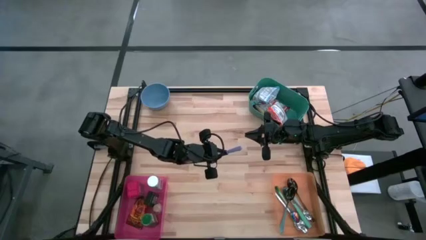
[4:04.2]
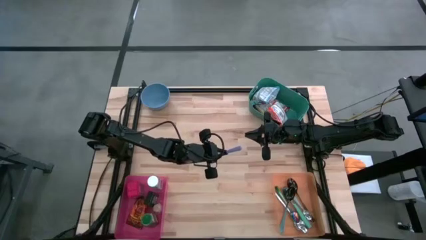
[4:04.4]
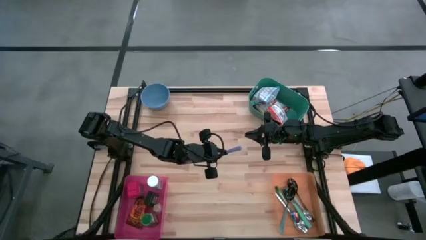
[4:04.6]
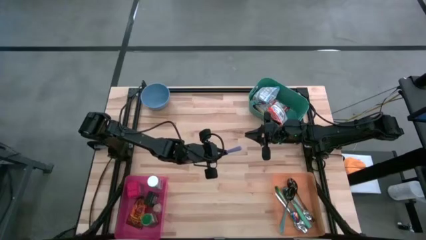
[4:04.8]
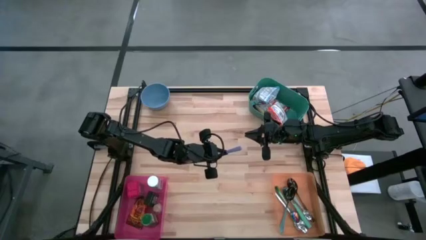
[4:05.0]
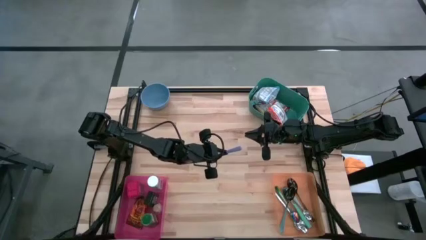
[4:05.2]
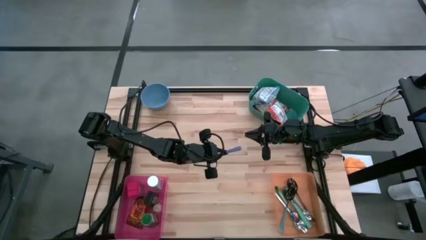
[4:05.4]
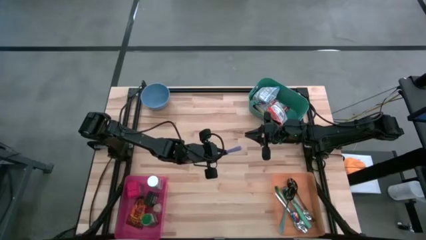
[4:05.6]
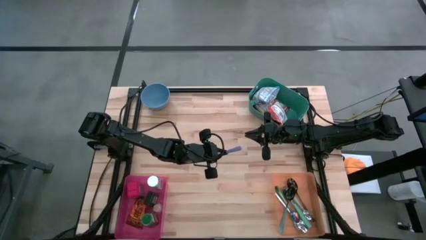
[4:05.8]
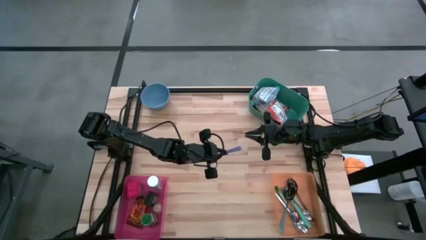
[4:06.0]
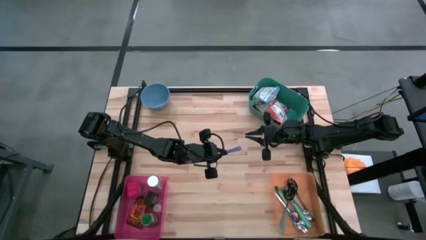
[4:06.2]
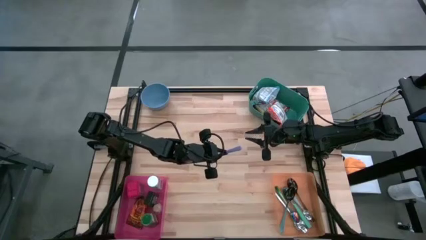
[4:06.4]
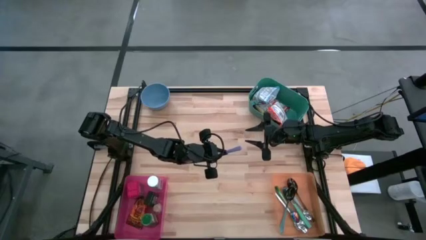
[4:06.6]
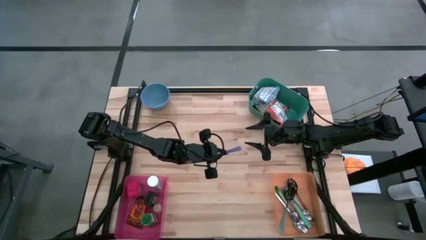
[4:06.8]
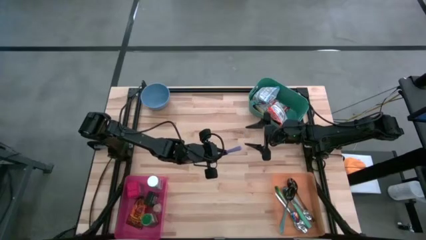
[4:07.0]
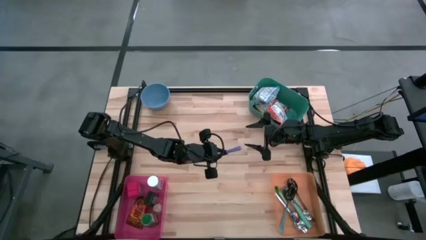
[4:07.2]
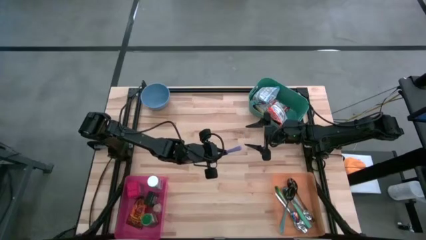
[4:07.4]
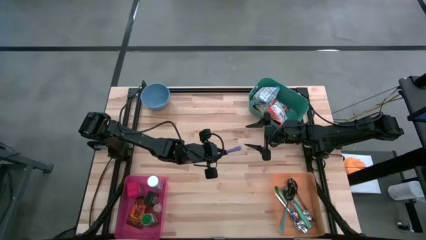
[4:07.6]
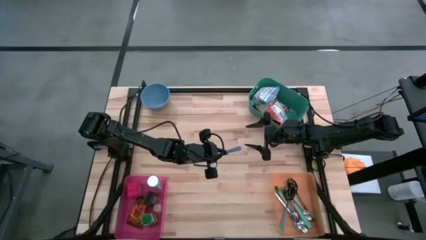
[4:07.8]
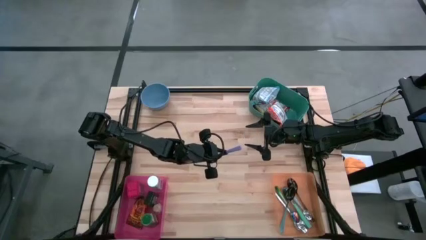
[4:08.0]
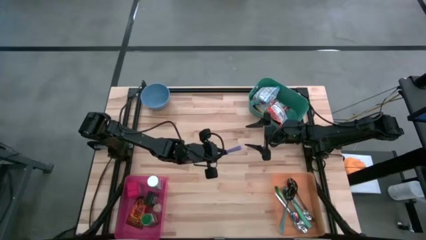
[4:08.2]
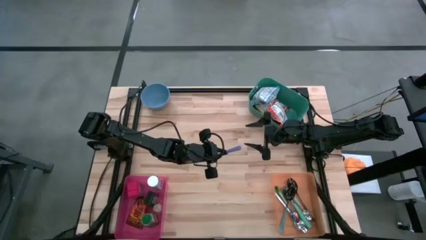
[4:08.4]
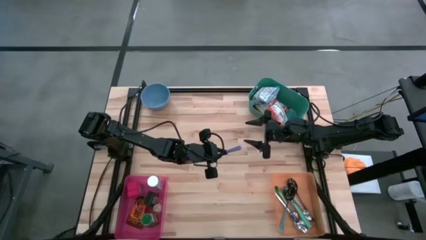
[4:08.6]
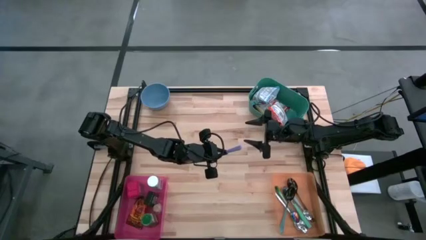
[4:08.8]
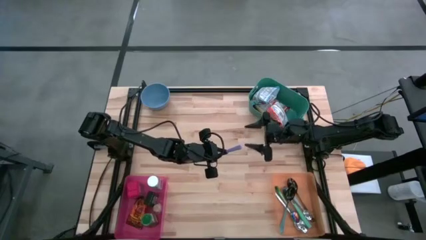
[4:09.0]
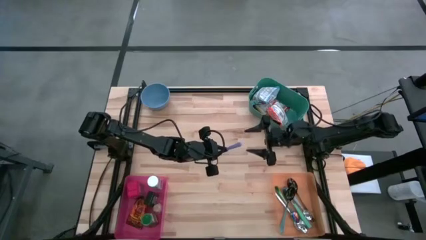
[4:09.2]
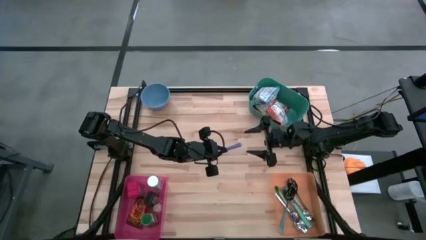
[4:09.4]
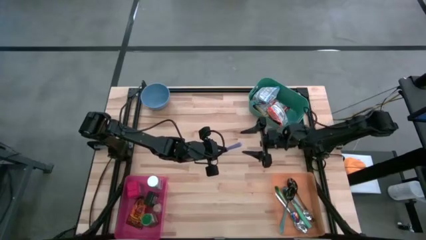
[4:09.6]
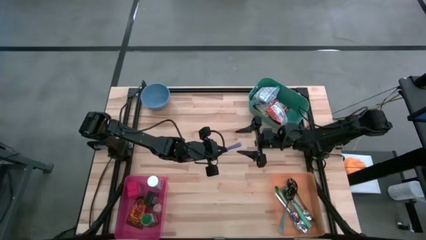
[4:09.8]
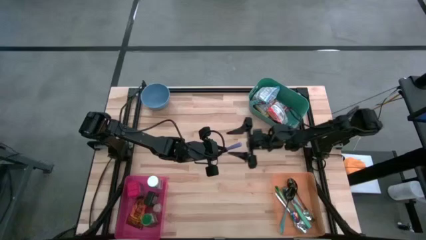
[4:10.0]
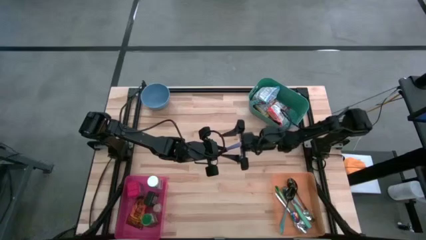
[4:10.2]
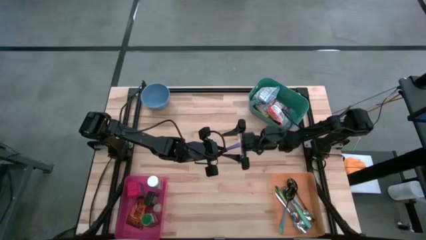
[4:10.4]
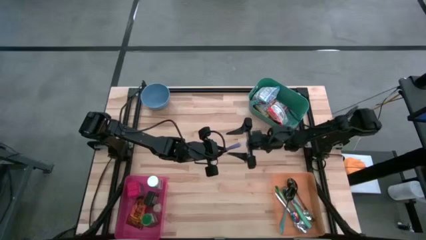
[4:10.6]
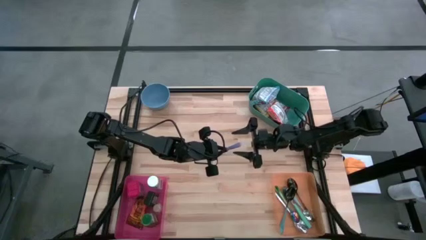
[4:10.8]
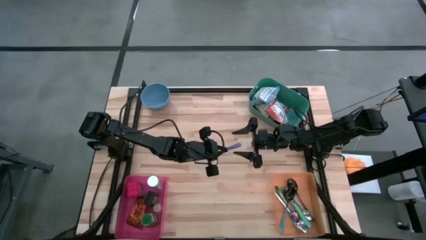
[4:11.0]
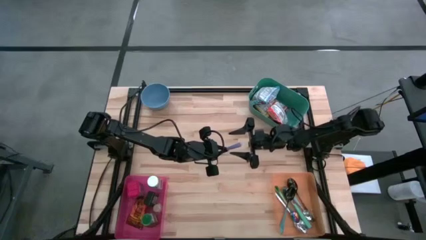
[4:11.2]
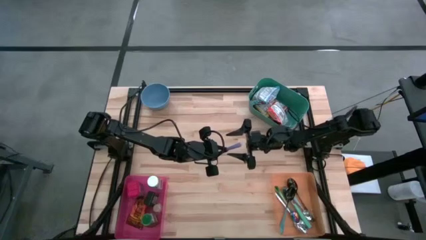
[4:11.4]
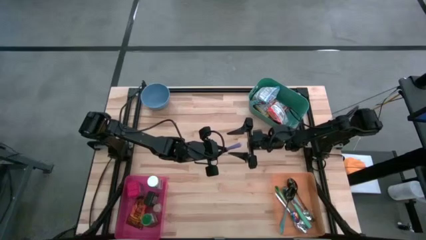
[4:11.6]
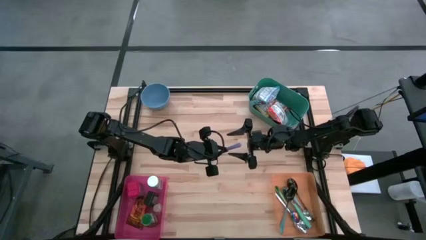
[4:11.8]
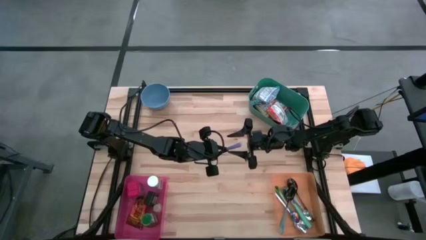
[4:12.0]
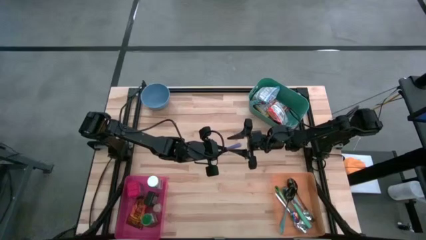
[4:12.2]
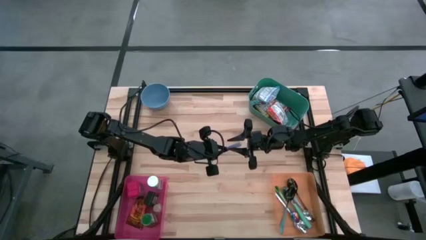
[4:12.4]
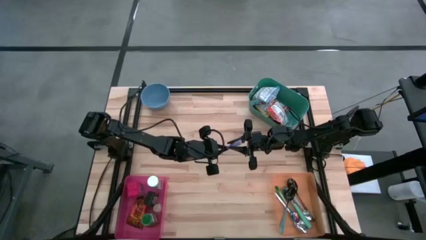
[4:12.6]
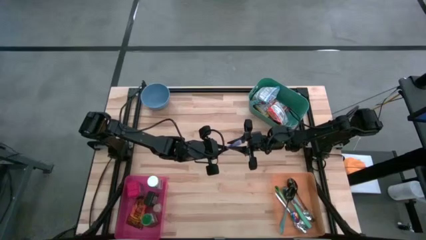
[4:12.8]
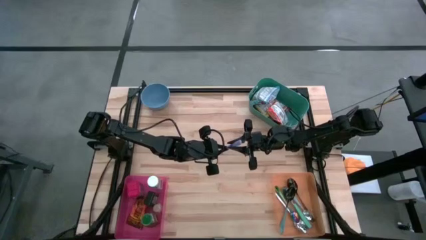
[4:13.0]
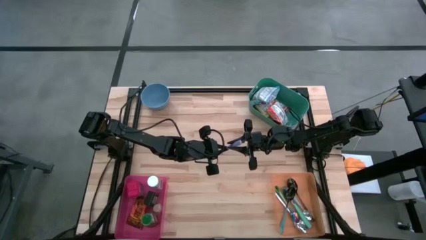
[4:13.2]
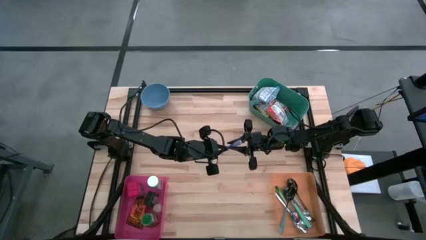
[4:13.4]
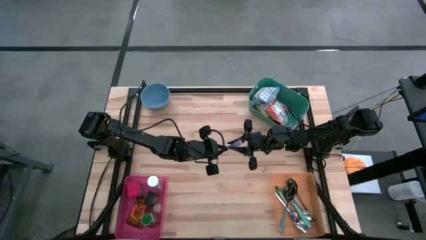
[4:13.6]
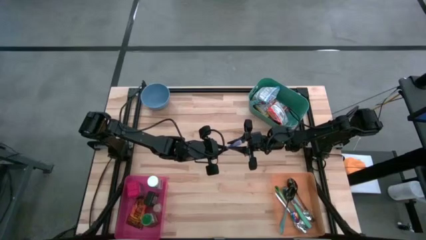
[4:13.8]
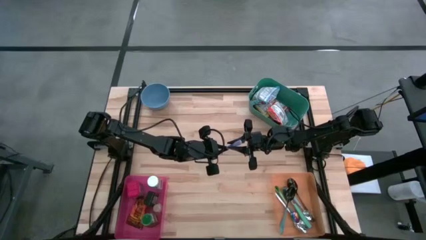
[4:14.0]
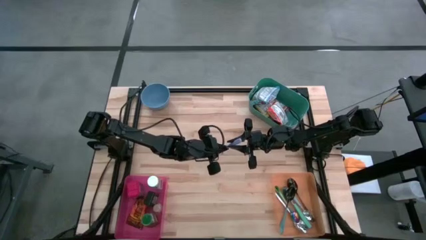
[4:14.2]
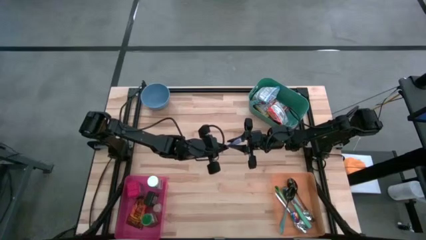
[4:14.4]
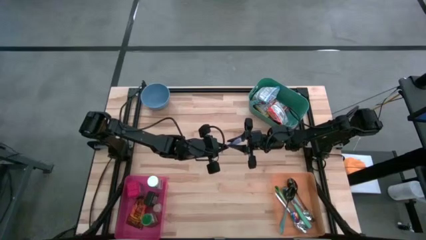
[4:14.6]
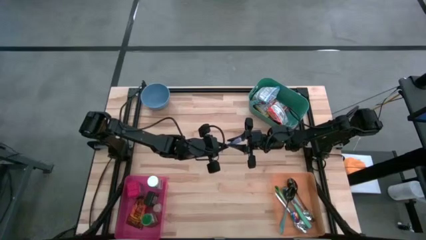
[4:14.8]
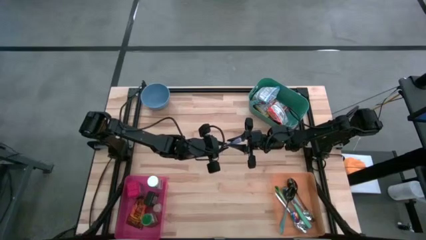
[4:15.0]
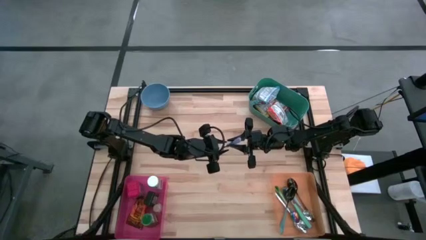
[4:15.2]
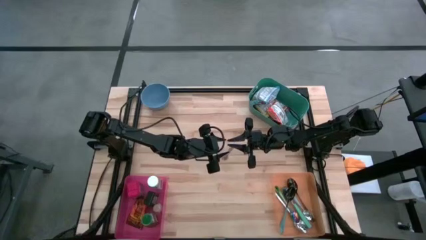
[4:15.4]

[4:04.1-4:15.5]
Put the purple spoon into the orange bin
